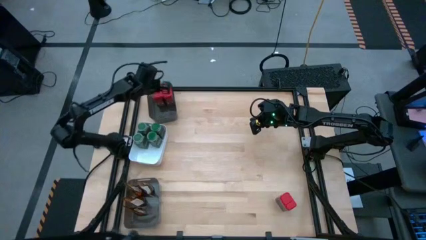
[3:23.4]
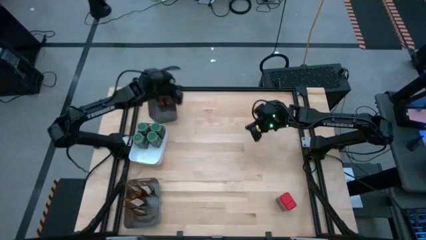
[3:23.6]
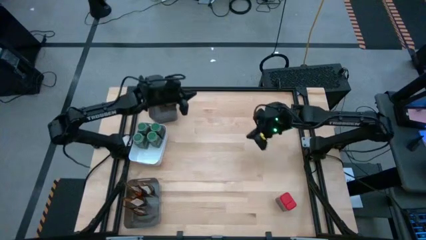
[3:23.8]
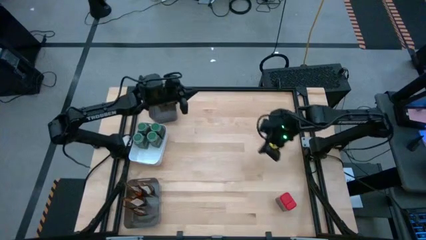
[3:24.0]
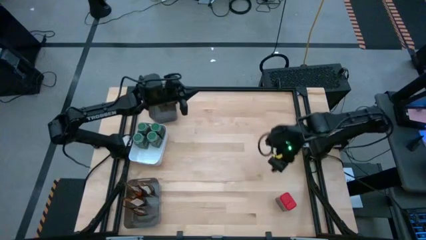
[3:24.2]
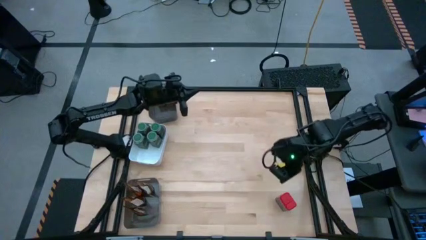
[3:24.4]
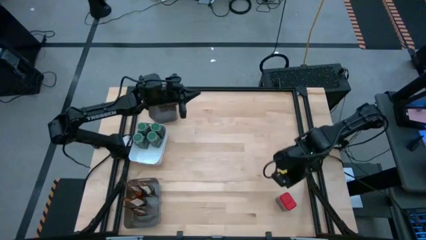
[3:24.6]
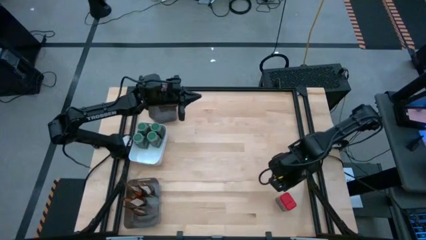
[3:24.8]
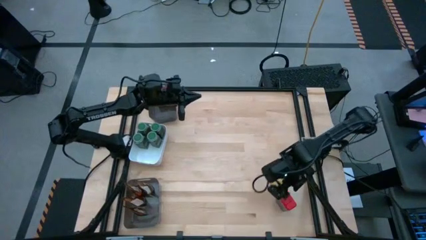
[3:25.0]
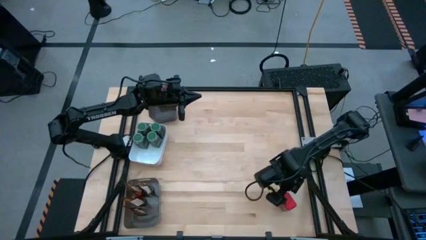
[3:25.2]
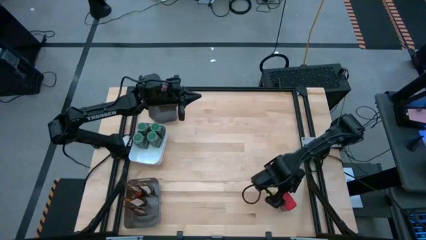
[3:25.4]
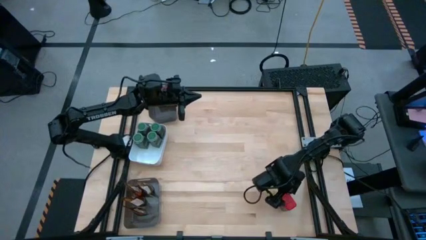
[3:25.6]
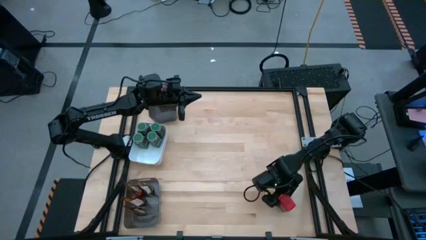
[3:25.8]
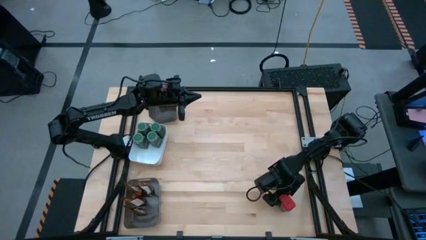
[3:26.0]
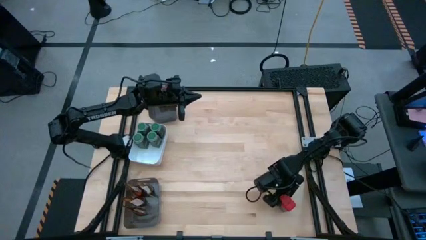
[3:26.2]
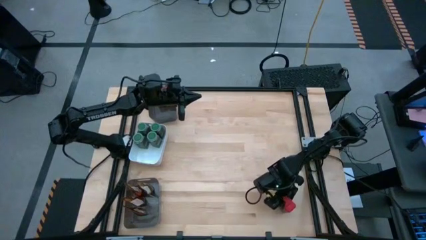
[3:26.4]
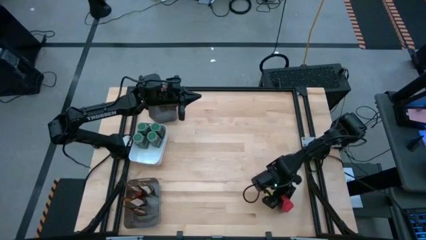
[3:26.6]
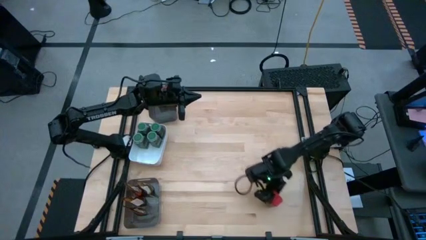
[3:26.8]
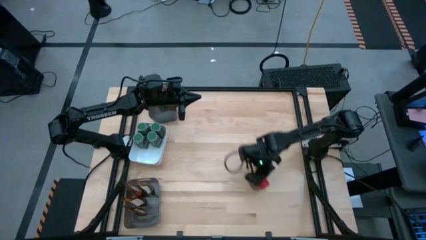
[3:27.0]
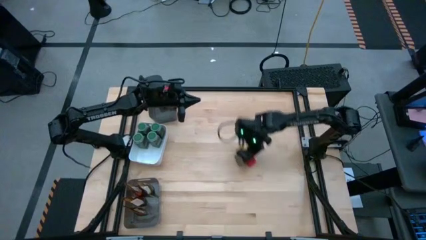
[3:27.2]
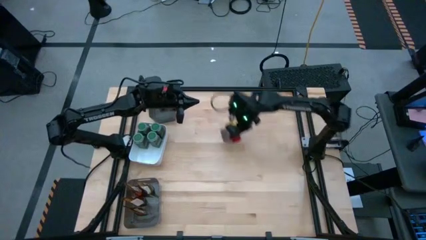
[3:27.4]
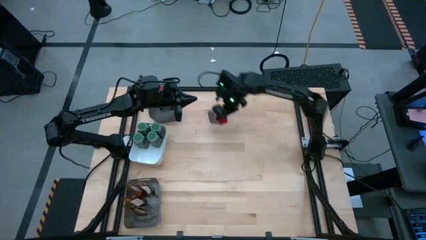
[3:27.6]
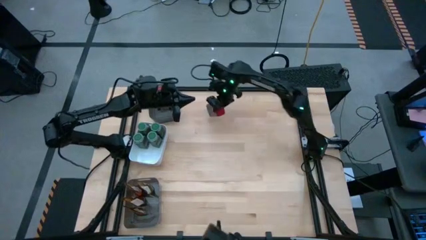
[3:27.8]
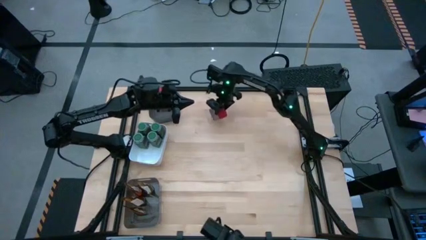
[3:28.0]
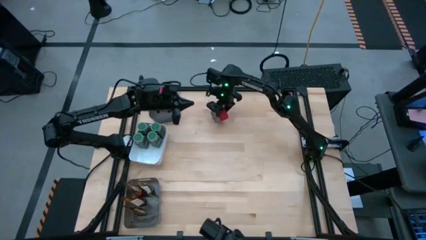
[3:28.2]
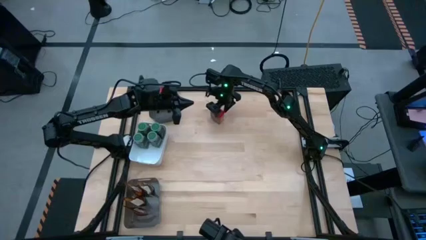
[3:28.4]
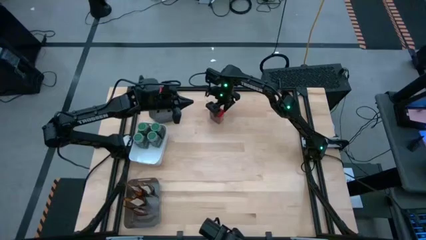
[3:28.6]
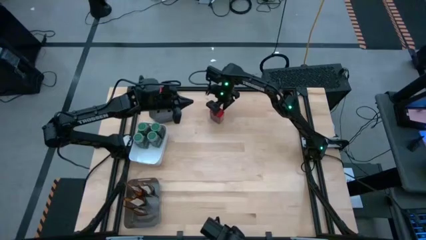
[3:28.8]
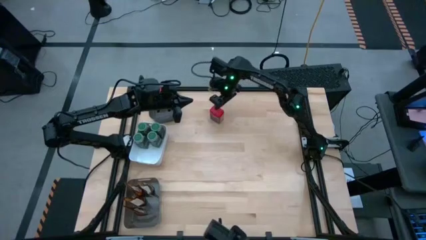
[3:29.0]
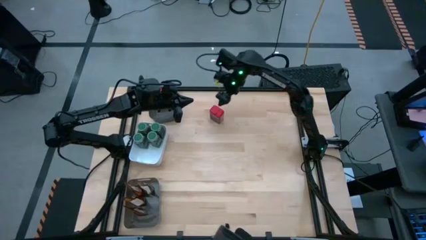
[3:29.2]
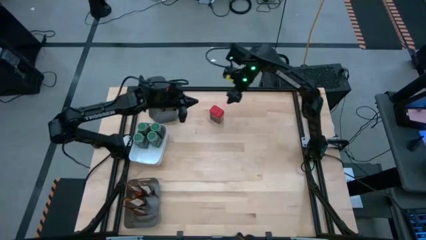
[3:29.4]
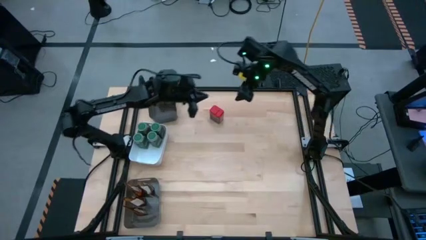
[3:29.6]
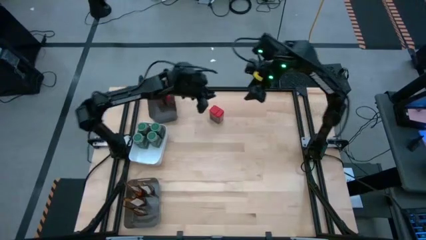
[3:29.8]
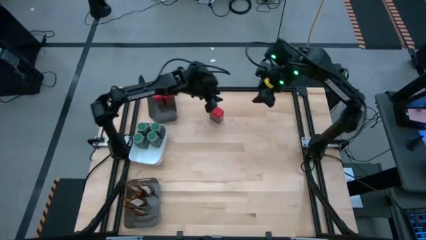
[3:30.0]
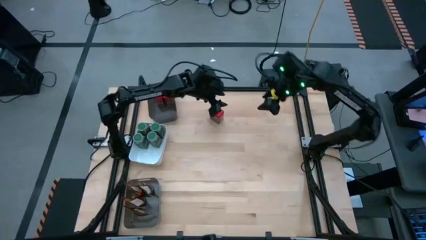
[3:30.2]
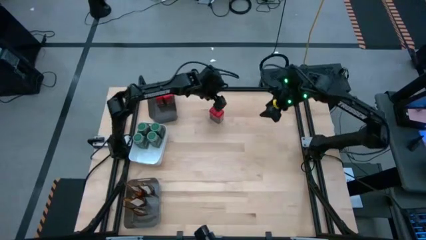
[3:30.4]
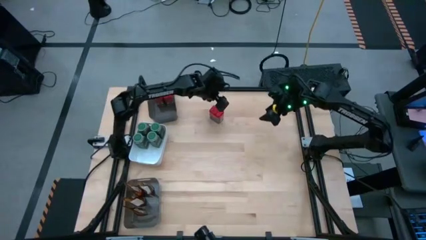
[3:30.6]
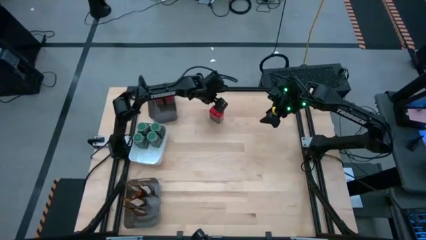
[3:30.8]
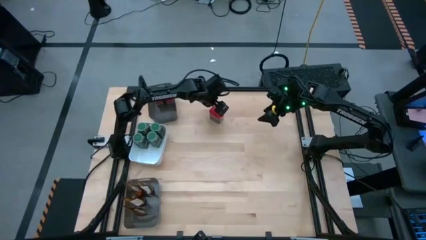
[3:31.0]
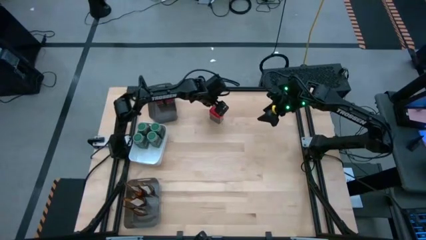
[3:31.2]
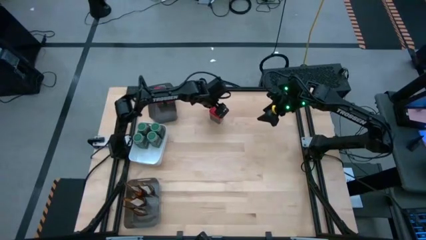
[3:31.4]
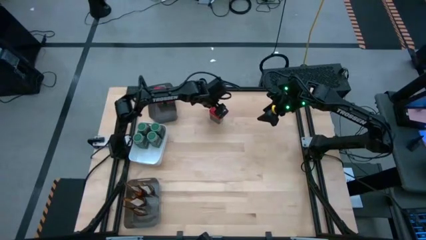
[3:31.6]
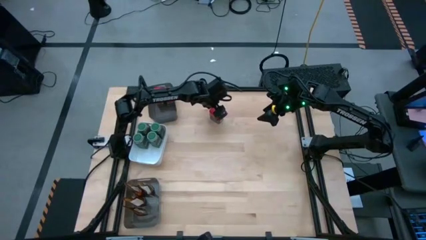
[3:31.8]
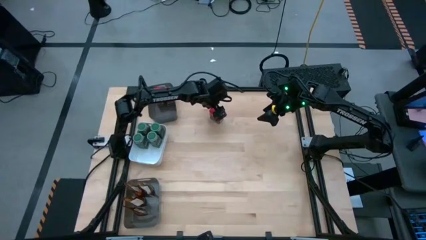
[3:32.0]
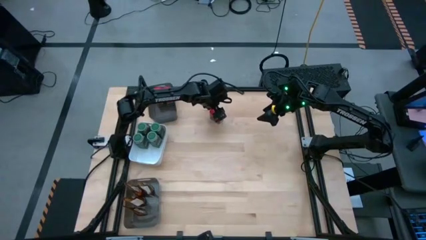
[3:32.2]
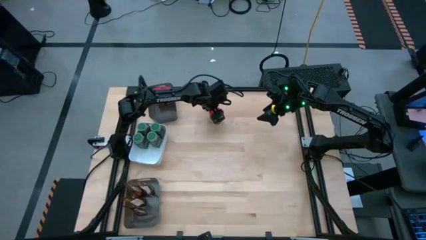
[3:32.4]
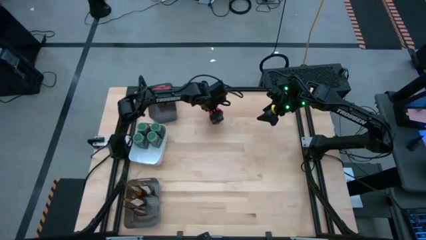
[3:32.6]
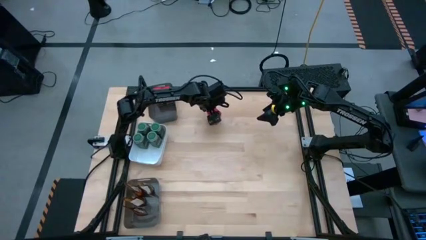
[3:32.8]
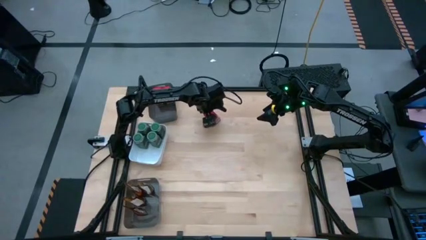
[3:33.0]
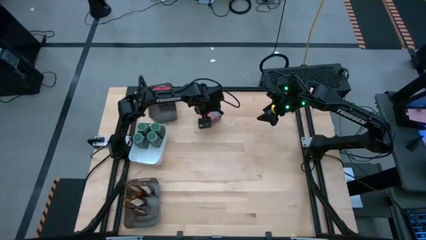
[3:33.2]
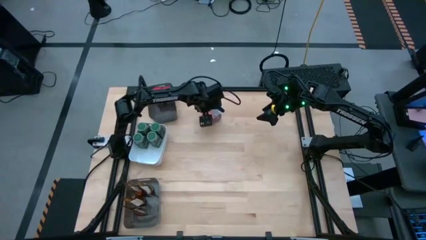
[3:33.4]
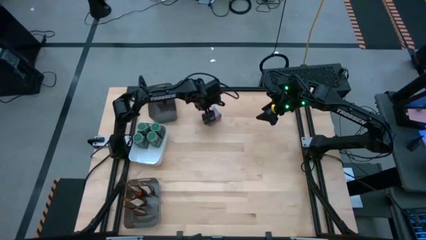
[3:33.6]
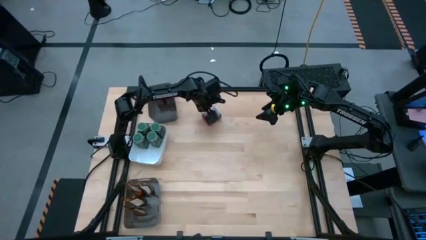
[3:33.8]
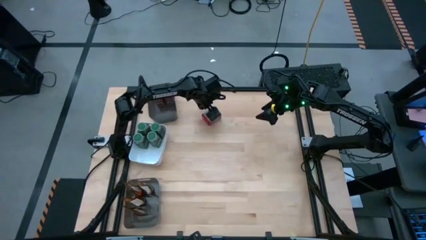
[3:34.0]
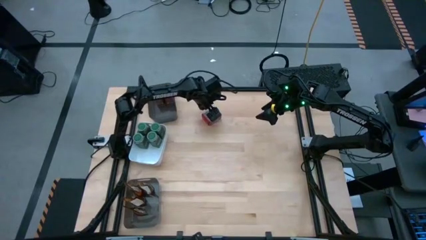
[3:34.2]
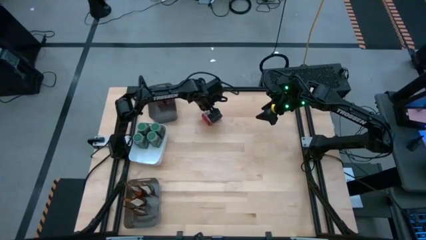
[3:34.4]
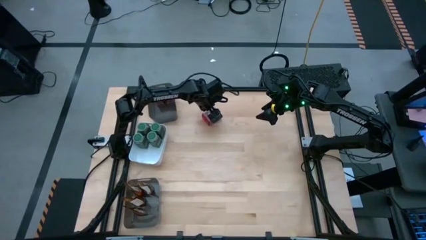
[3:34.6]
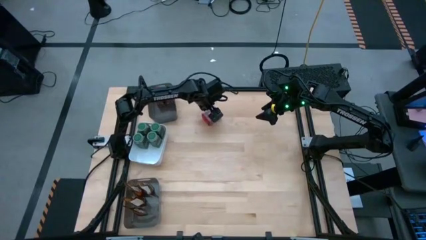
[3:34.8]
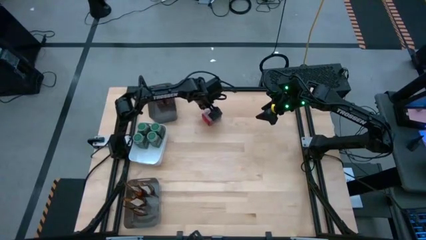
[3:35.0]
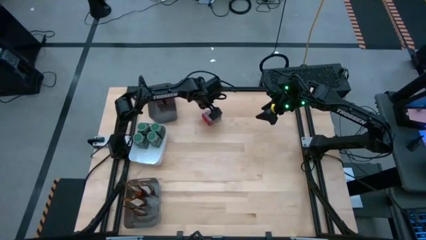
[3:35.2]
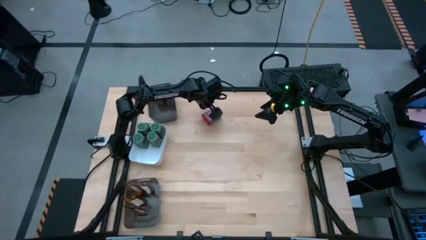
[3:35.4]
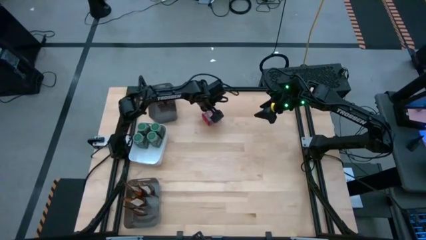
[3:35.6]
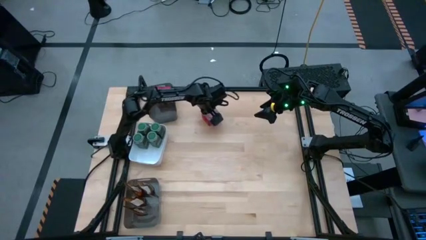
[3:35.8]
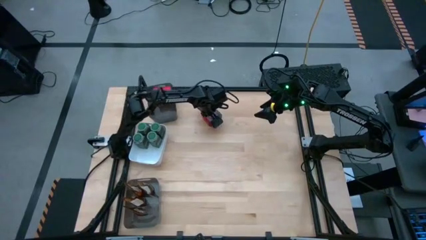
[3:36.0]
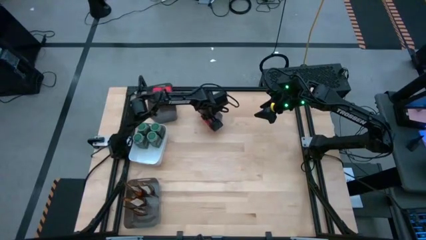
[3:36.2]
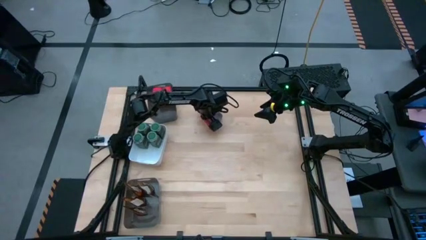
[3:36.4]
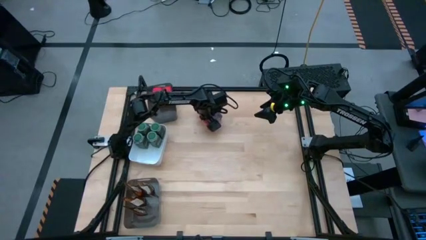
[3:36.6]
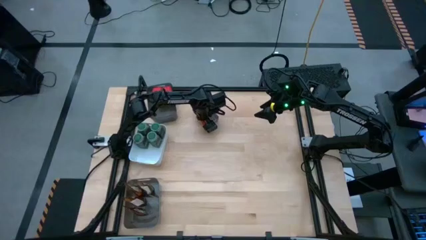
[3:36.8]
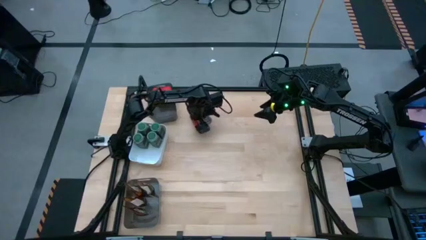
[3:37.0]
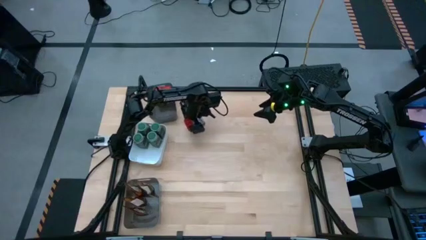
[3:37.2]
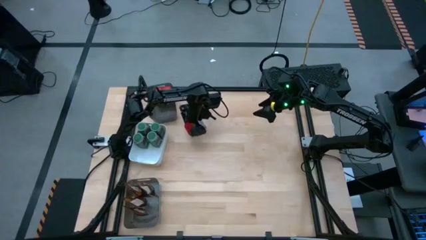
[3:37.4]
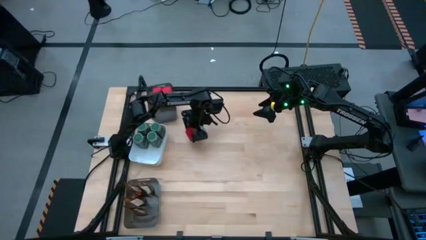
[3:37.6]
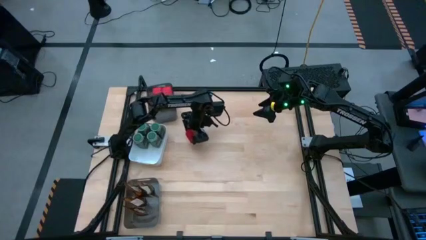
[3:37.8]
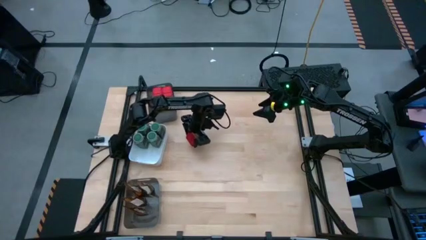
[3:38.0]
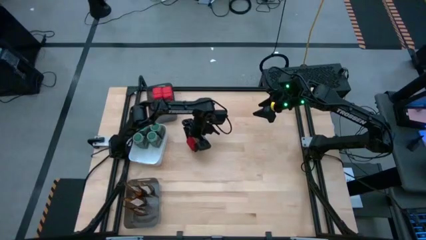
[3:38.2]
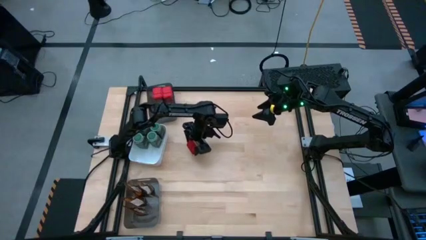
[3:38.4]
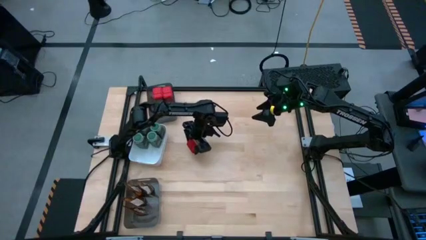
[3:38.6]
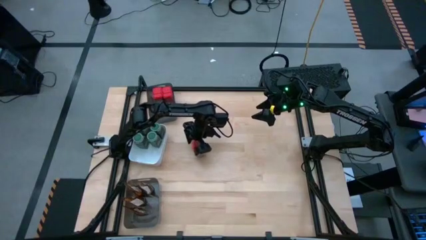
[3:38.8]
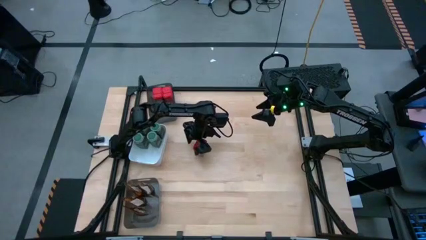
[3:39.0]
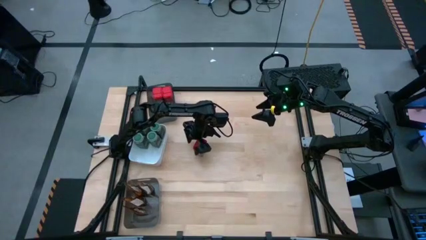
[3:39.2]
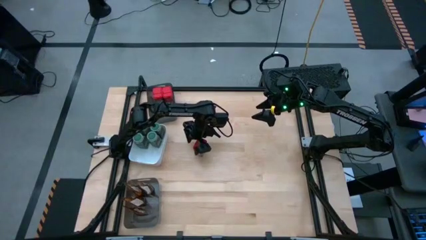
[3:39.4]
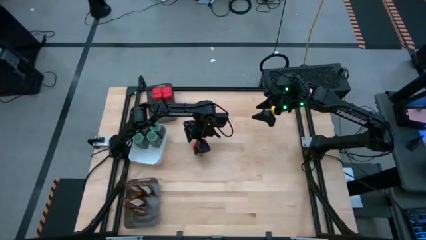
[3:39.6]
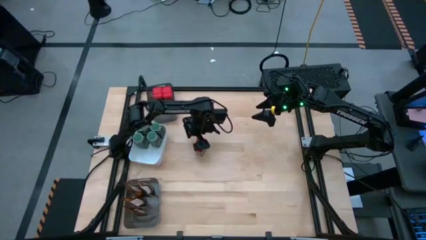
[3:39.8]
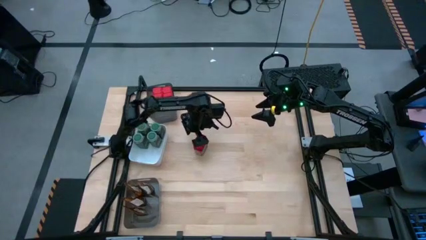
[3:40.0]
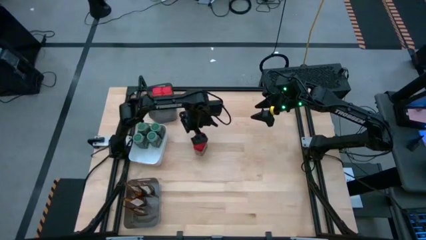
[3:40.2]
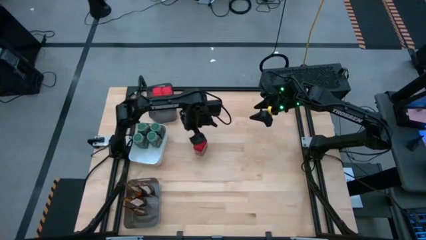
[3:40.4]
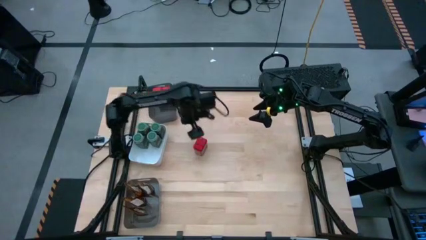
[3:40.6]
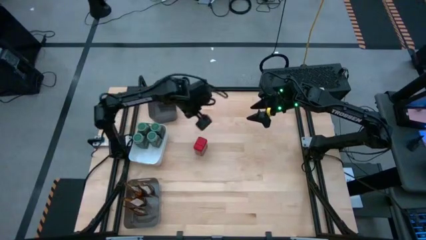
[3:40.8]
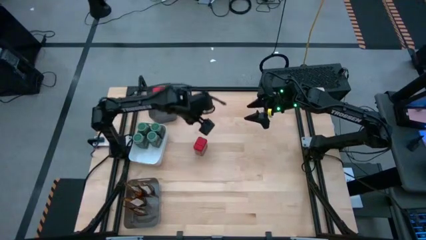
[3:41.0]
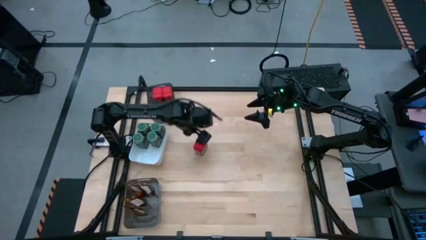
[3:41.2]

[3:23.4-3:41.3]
Task: Sort spices by type
Put the red seasoning can into the top black bin
